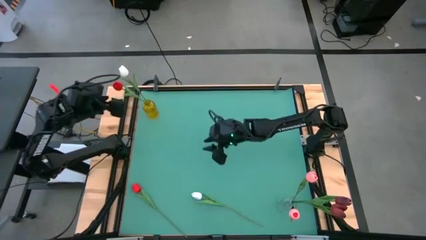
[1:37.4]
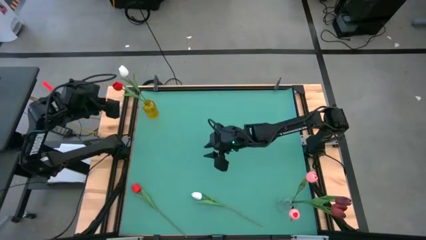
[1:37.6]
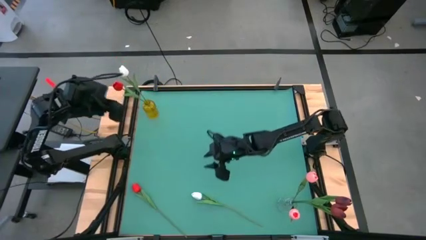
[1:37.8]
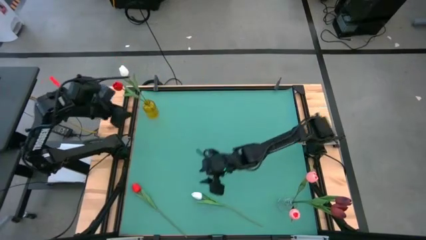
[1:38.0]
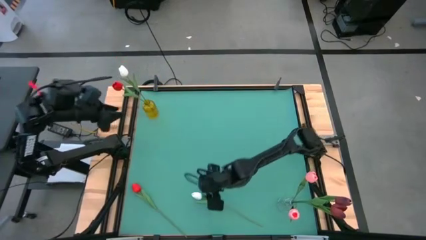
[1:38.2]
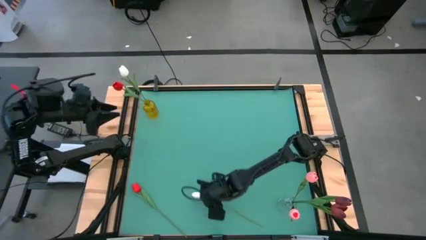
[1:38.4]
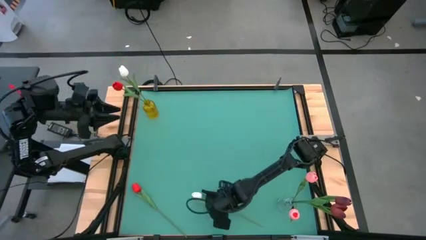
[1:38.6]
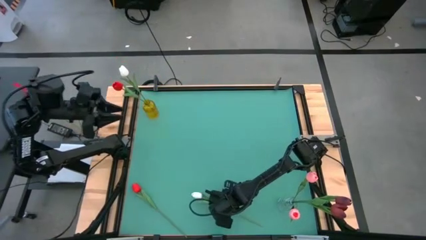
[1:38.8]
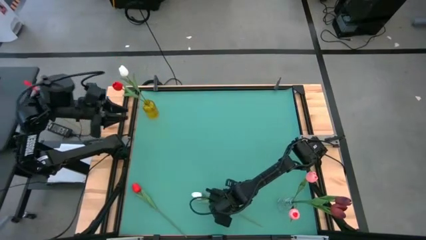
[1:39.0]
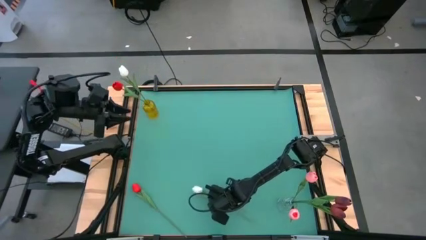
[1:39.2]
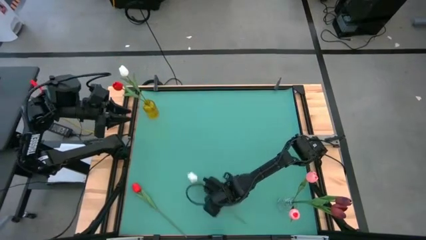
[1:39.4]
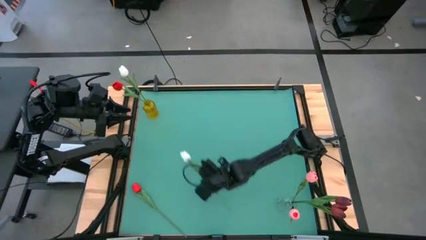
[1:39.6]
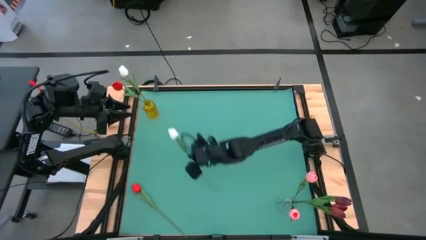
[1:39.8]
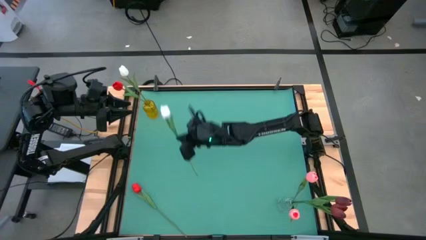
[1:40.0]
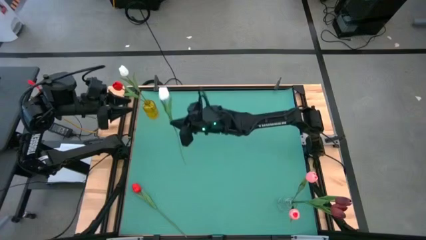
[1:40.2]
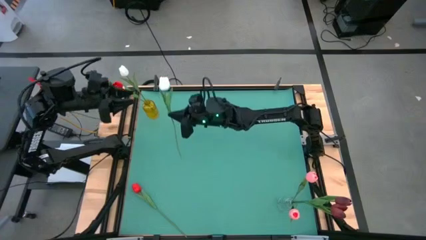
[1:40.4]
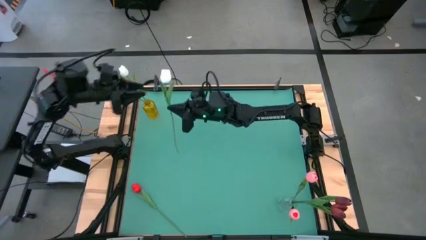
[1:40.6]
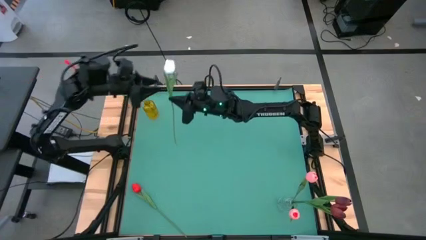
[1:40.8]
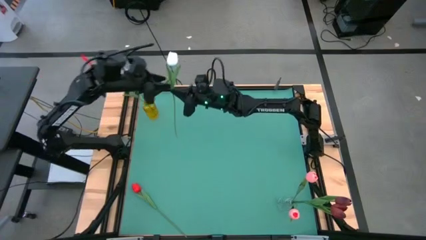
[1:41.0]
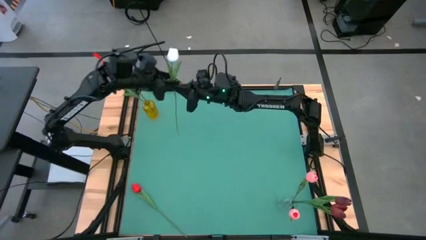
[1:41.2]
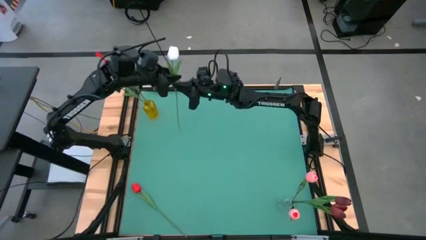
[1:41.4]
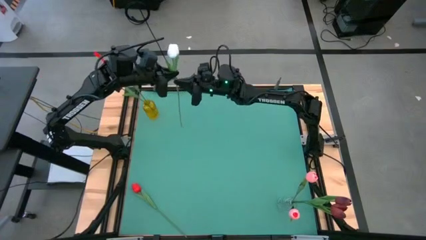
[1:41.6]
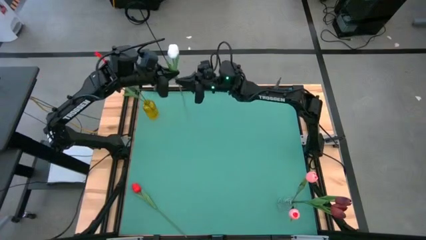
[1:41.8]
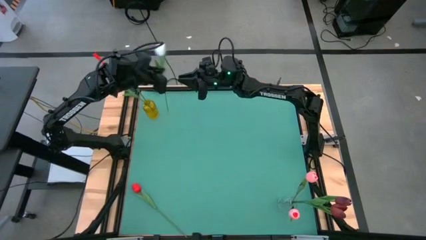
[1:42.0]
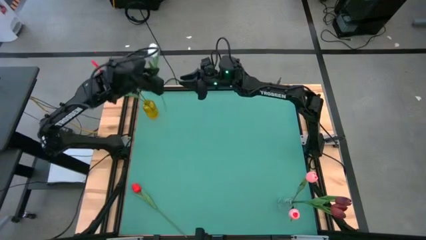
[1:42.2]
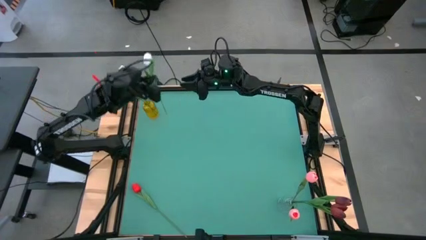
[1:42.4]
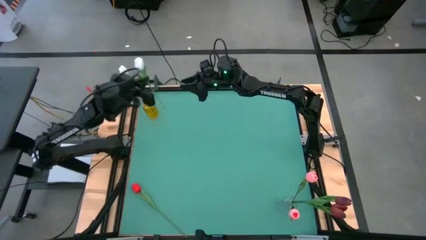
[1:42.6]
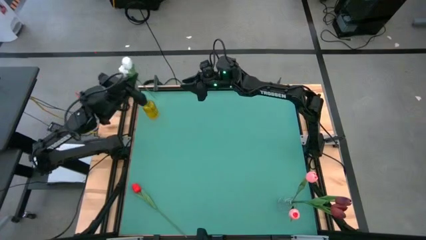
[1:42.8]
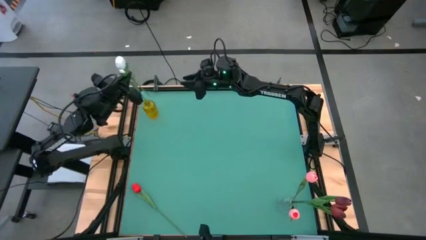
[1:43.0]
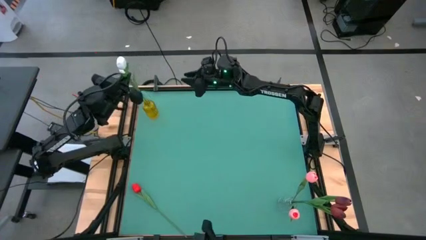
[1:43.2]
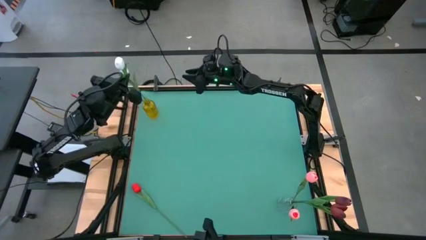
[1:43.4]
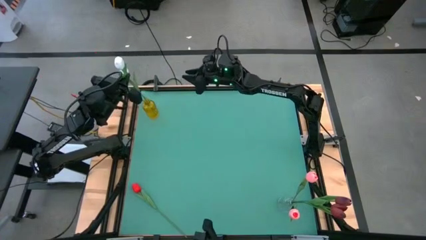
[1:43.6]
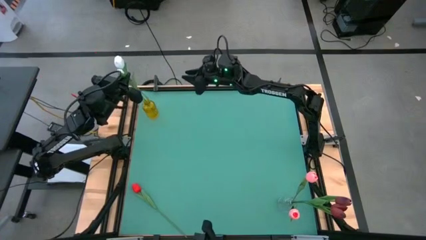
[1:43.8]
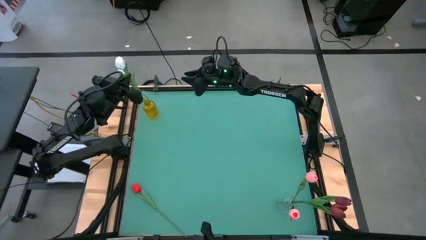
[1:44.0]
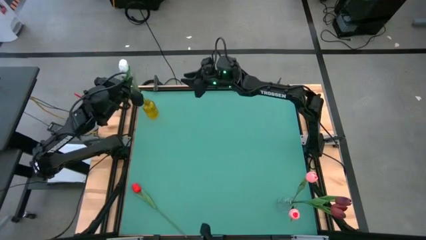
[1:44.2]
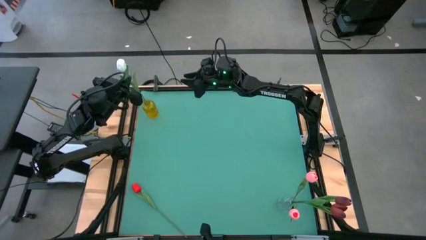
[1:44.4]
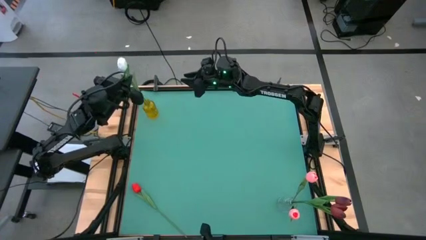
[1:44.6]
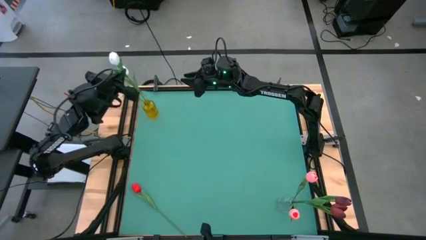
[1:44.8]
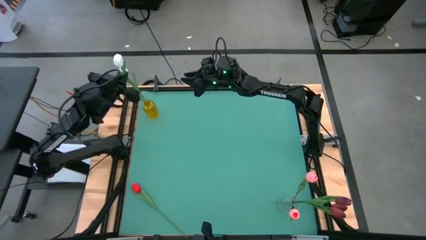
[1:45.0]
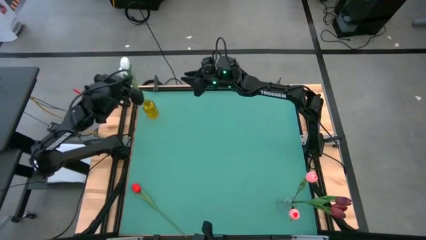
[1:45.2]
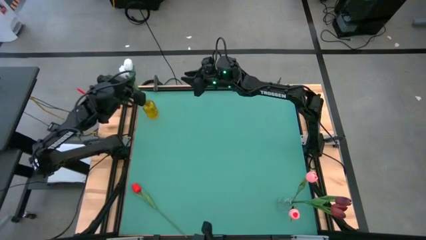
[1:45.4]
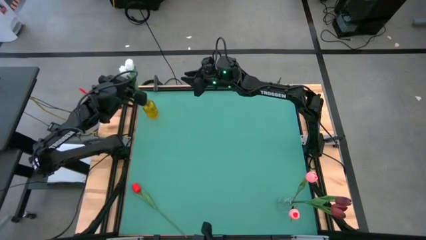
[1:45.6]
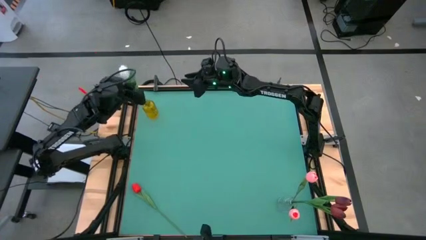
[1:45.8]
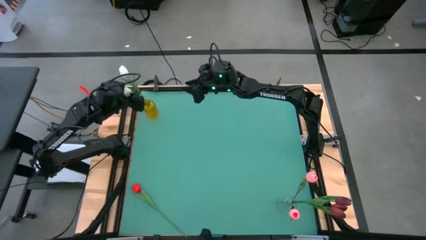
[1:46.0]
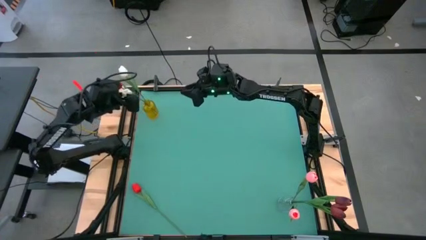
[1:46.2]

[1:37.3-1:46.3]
Task: Sort flowers into vase by color
Put the white tulip in the yellow vase

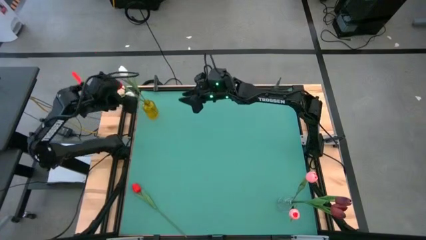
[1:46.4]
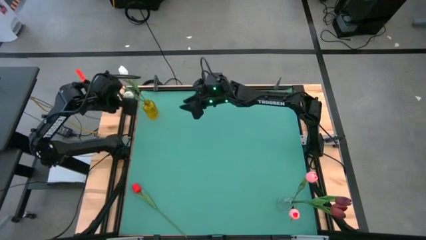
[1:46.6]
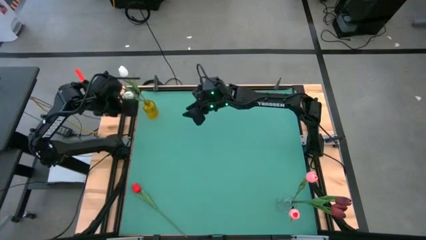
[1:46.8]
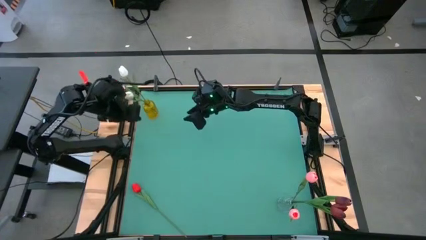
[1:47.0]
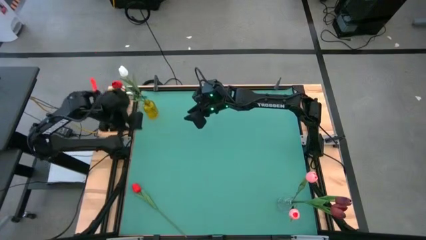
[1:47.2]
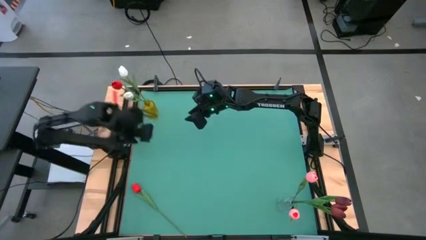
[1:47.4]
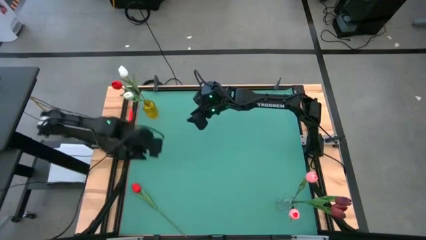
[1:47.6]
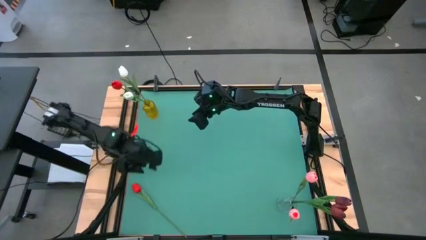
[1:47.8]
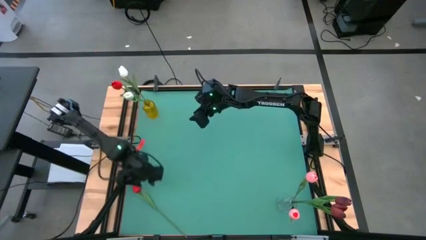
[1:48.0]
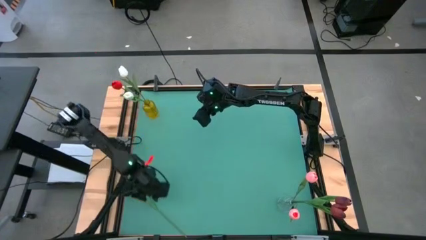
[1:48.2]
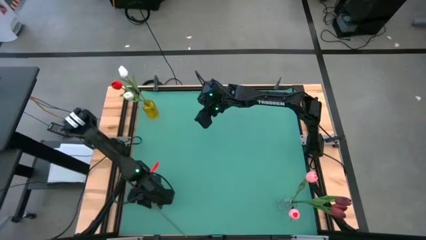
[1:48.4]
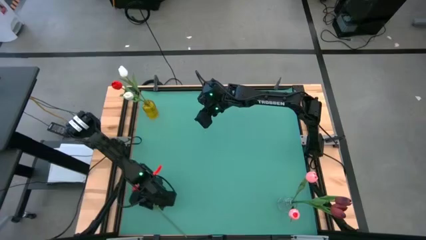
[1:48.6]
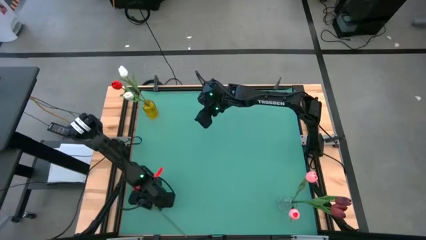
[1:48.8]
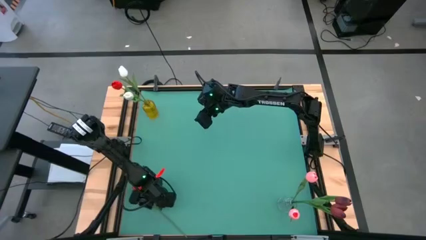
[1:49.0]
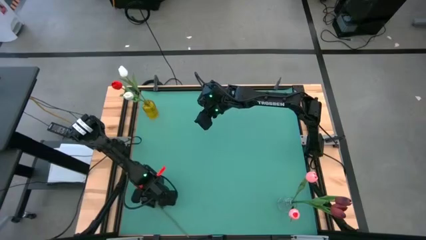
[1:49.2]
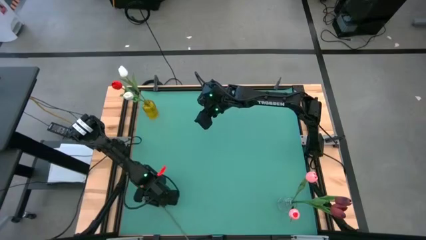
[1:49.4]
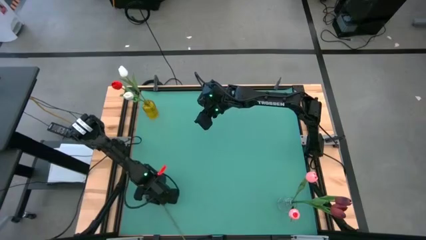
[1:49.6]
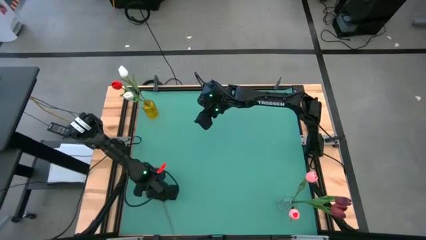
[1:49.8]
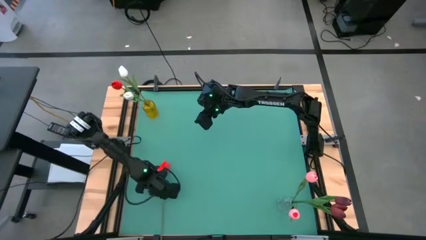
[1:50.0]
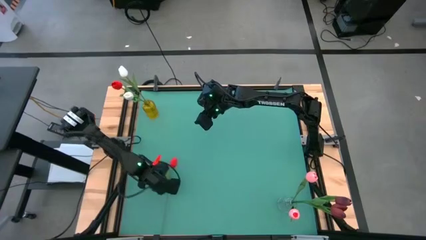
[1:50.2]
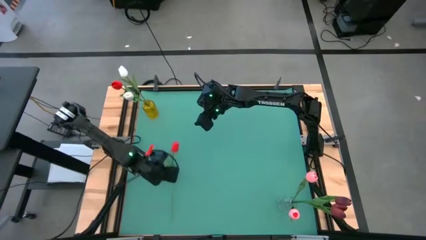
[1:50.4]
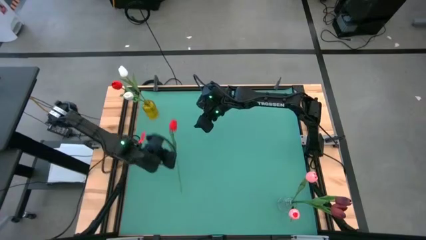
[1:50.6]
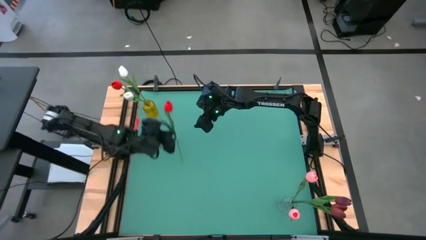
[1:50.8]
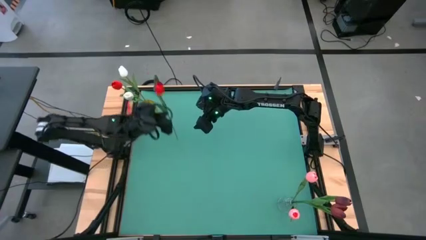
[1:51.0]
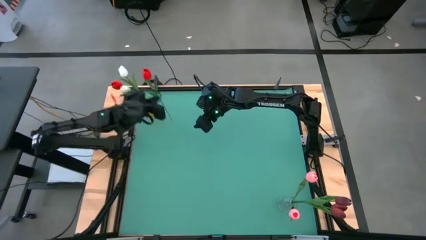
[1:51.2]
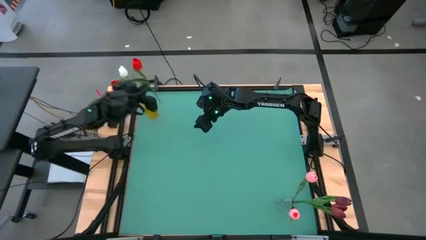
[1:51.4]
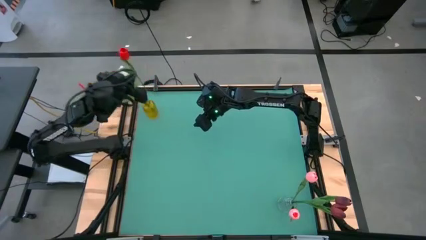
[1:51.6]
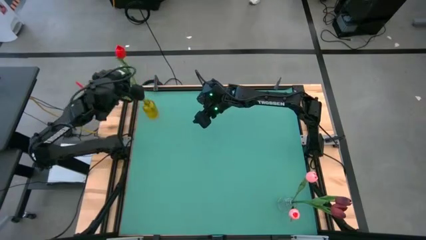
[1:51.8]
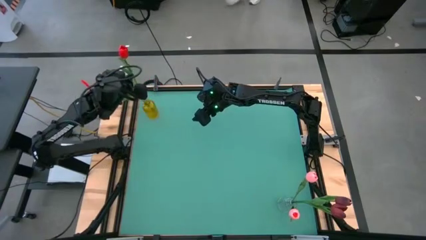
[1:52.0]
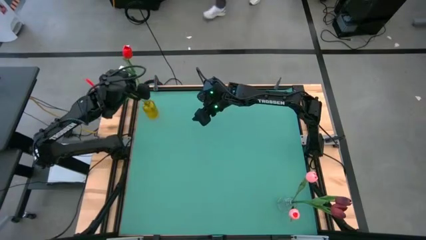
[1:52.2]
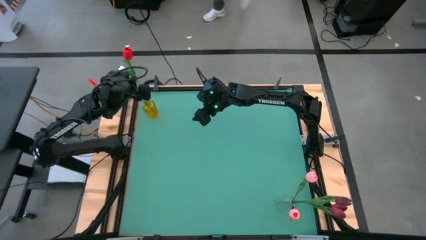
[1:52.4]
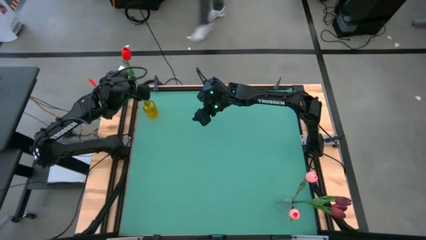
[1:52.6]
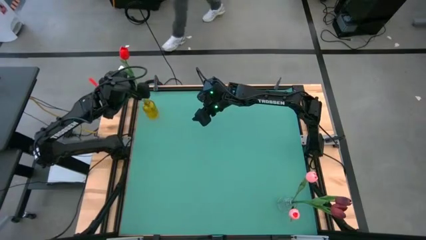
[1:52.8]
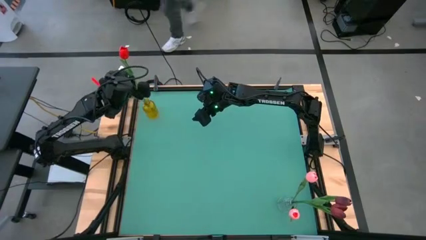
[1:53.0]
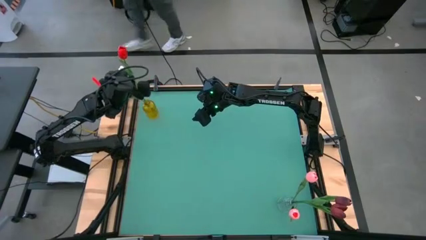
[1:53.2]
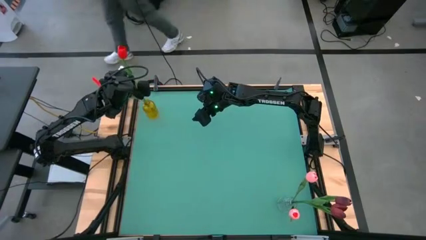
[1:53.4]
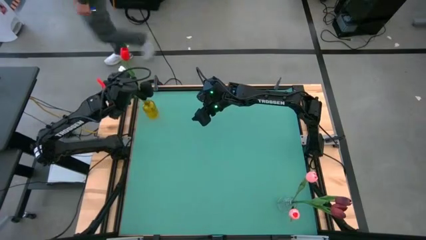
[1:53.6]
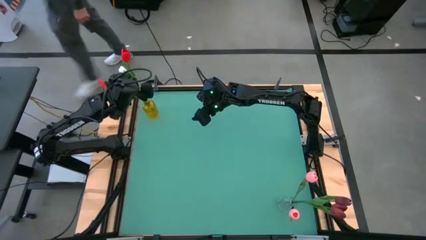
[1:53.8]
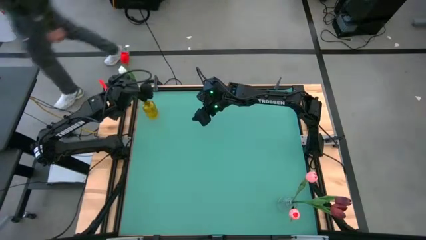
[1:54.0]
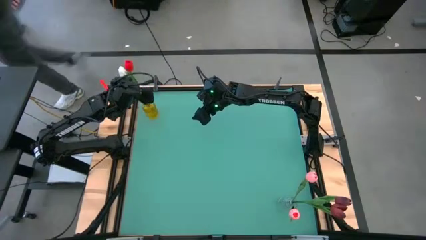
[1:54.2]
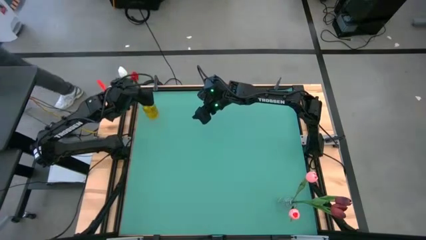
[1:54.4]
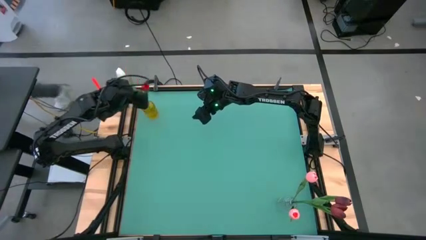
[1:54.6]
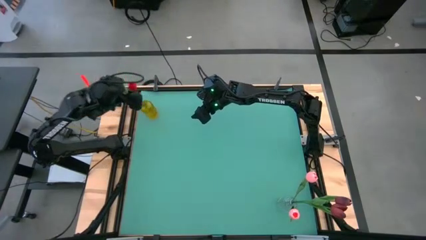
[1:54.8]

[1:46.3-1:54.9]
Put the red tulip in the yellow vase
